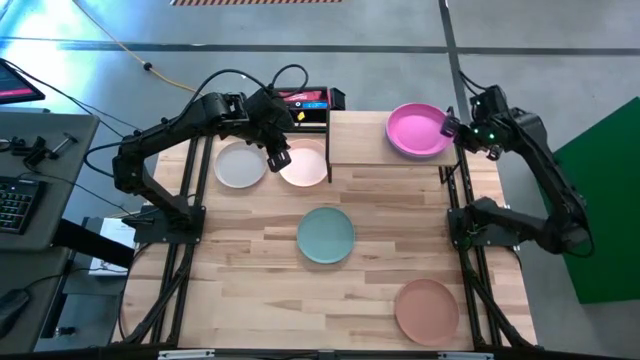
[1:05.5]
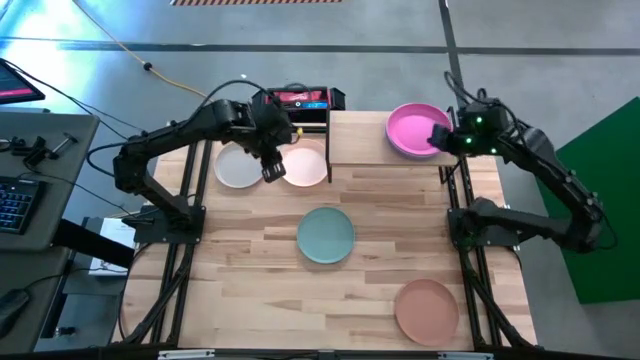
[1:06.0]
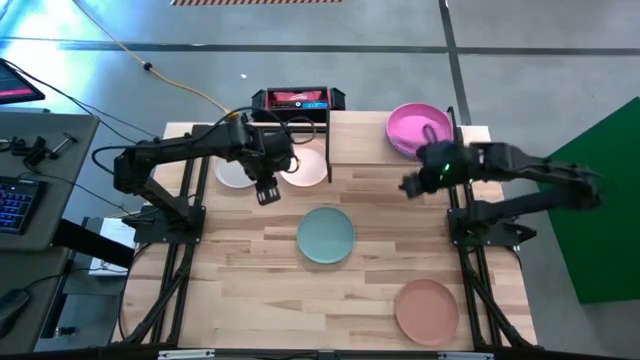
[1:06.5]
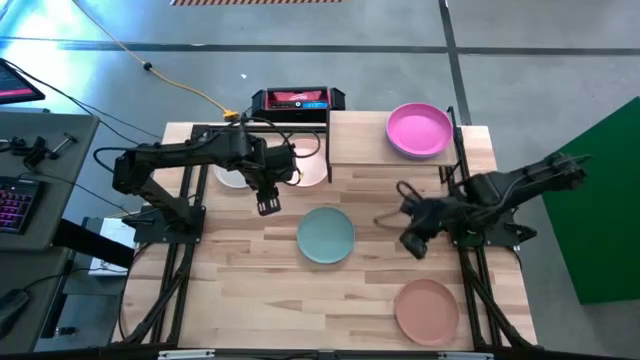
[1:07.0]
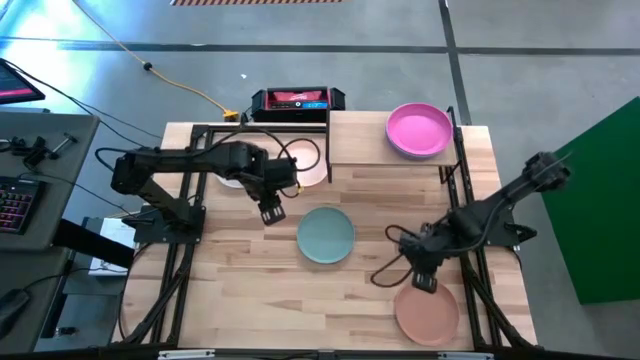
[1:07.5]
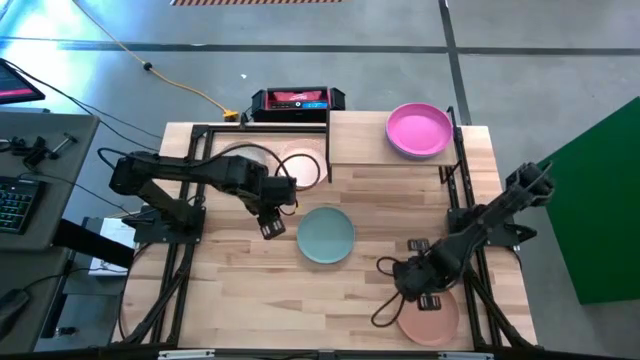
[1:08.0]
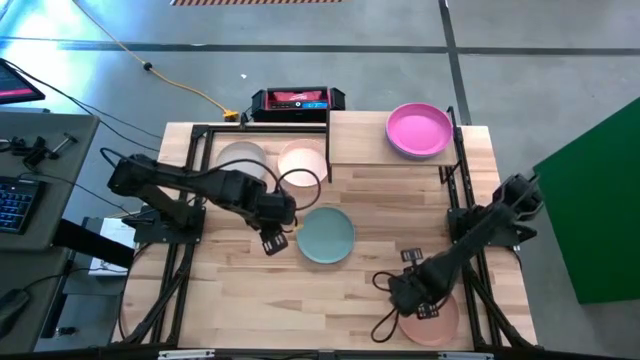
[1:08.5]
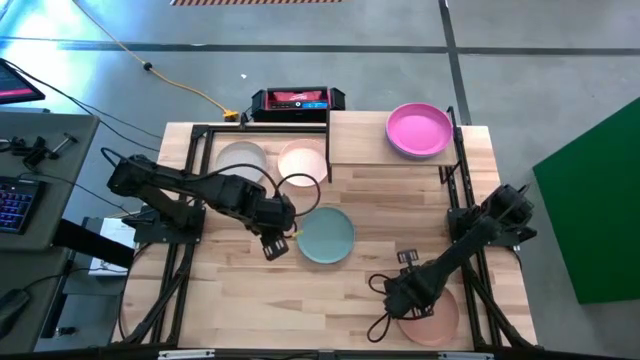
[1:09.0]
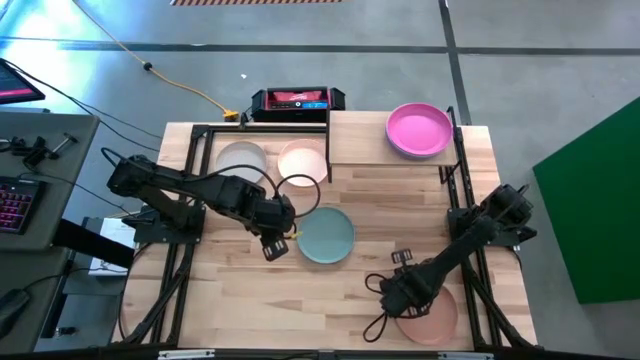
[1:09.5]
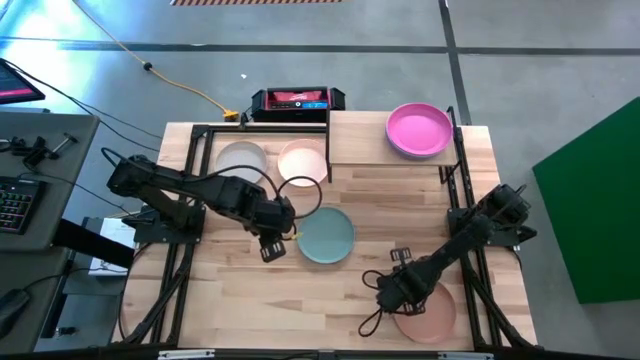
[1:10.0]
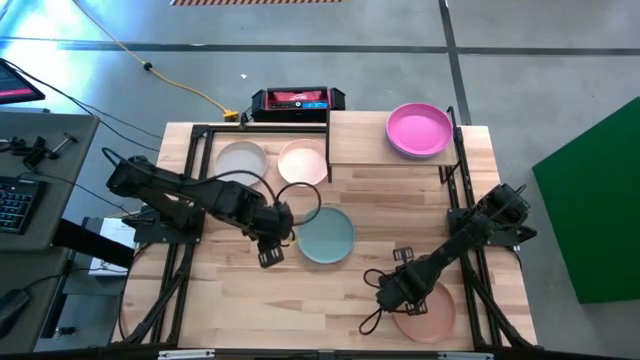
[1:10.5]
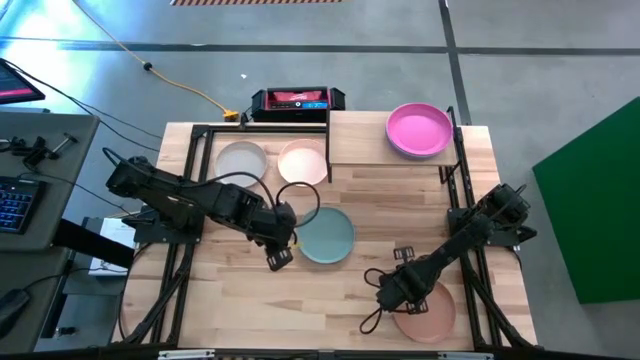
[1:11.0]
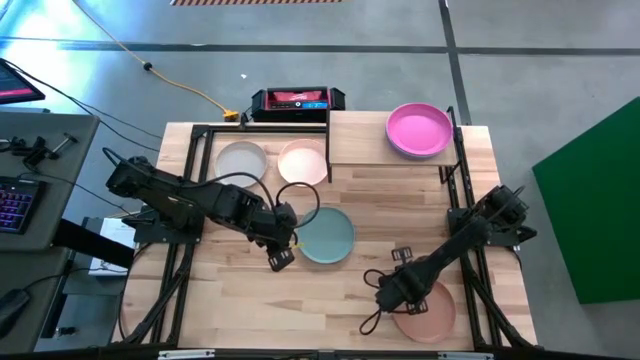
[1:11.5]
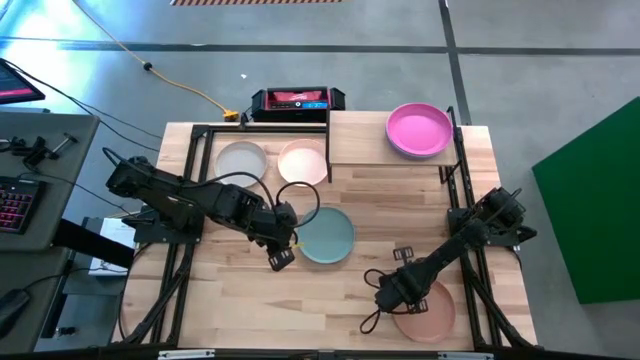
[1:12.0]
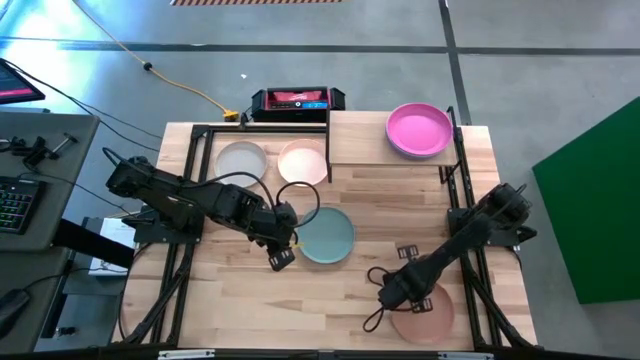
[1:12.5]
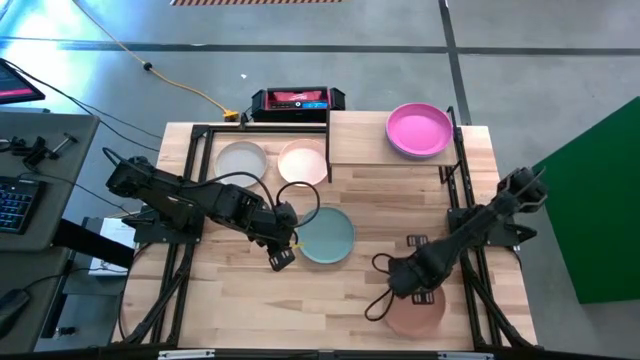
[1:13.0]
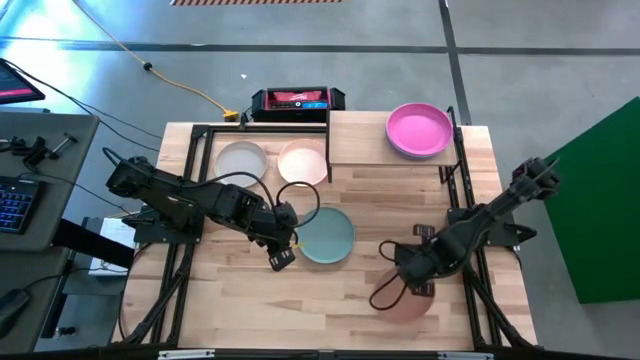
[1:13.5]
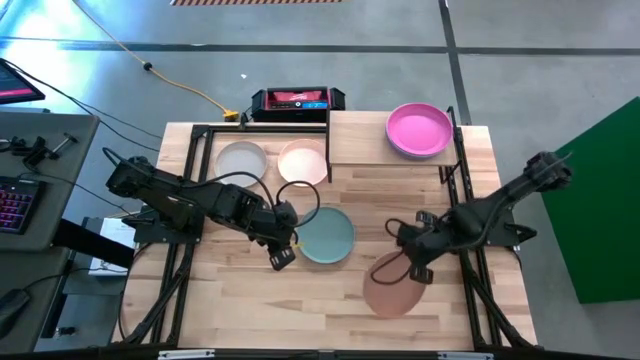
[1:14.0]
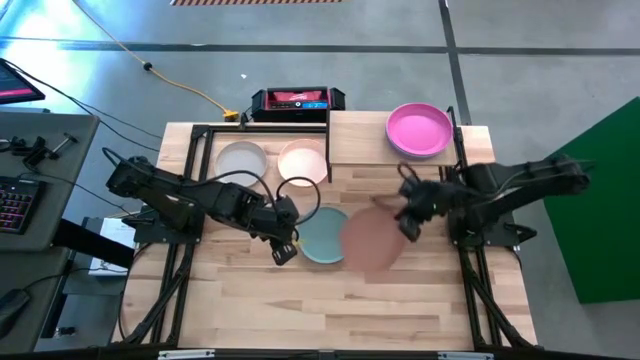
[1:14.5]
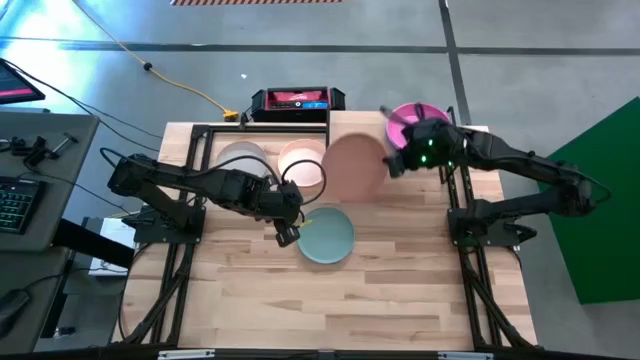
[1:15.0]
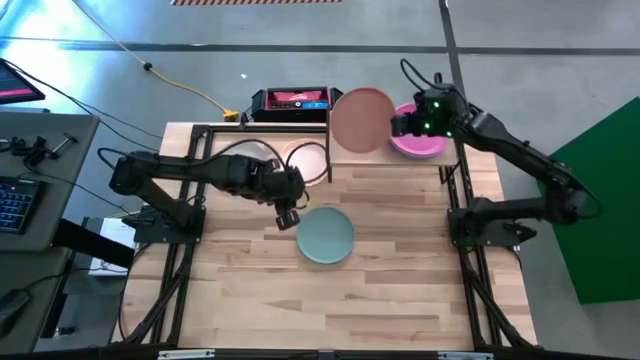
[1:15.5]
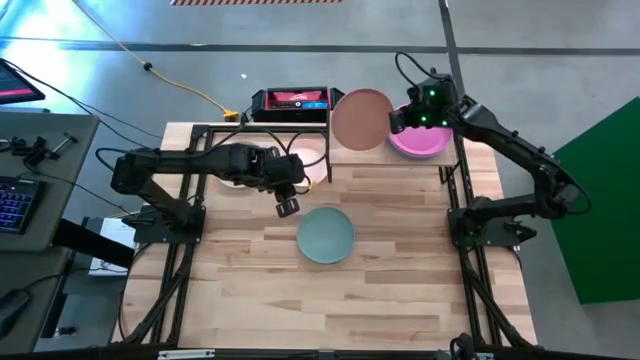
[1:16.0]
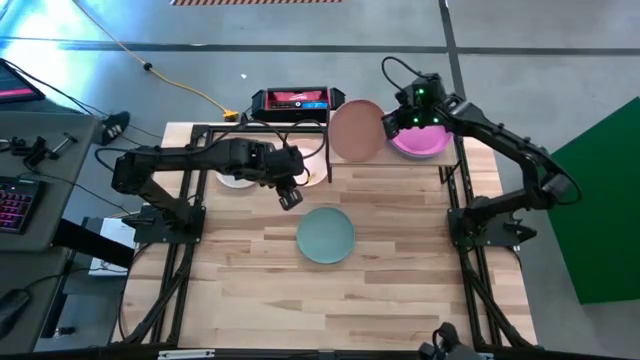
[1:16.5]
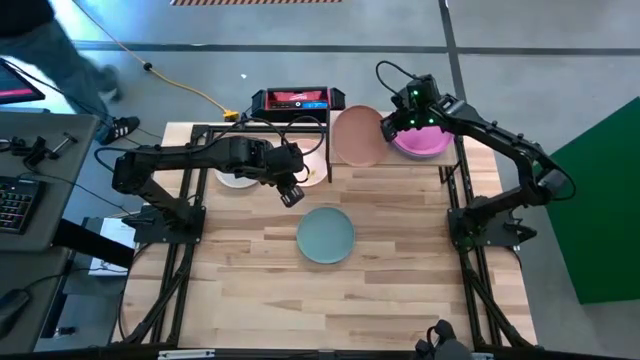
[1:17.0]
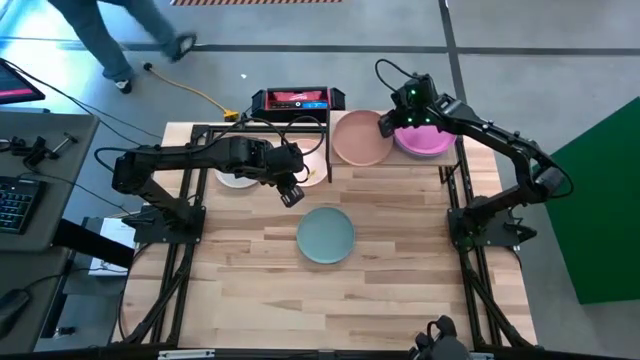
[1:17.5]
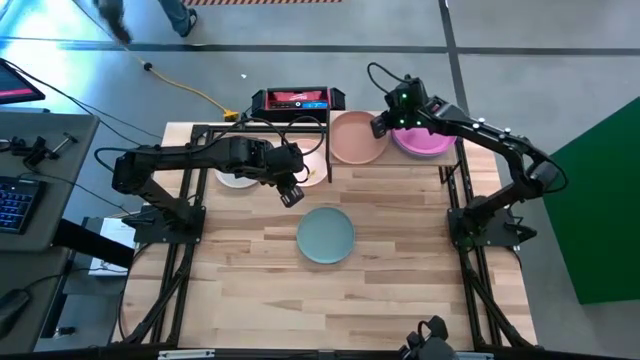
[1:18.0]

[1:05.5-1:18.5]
Task: Place and stack plates onto a shelf
Put the brown plate on the shelf

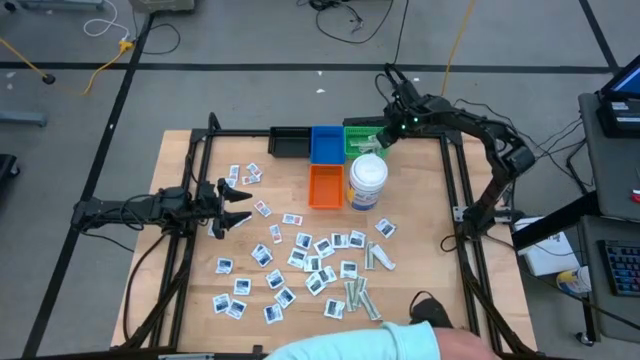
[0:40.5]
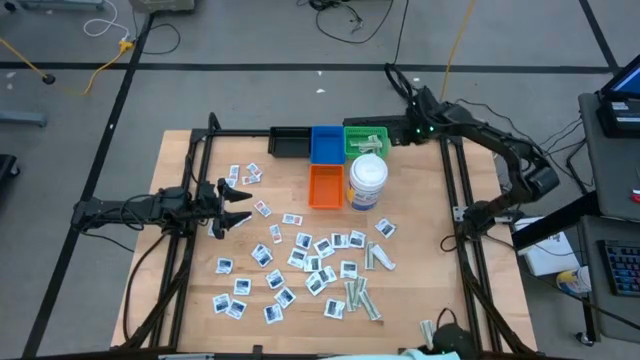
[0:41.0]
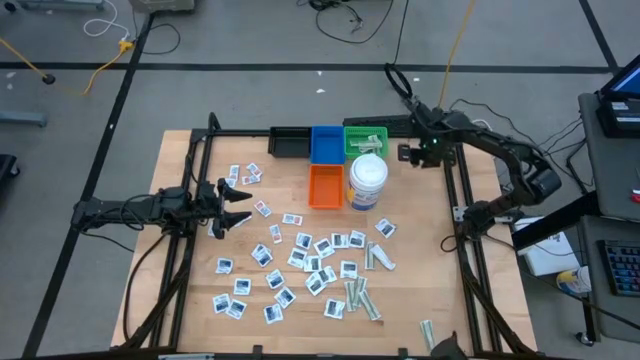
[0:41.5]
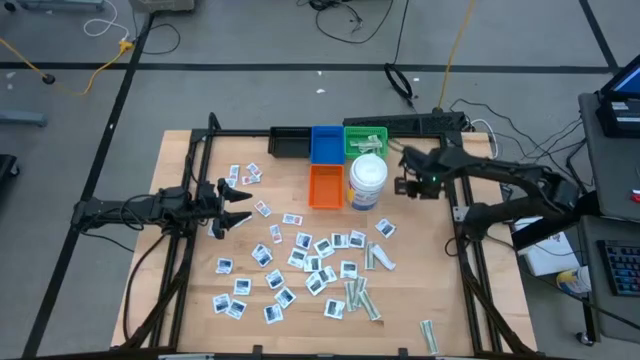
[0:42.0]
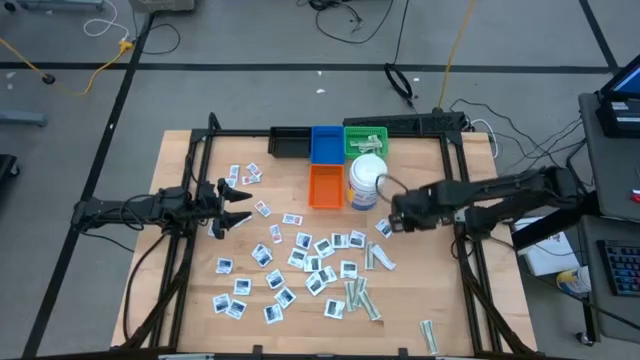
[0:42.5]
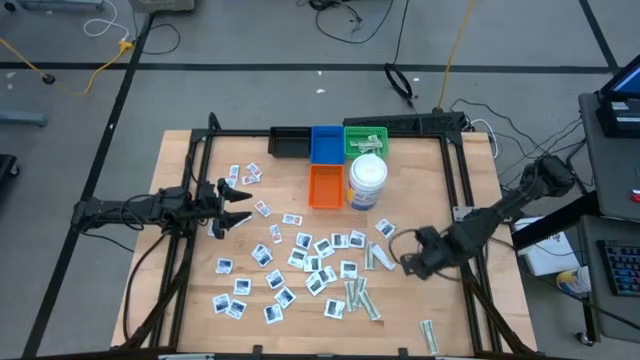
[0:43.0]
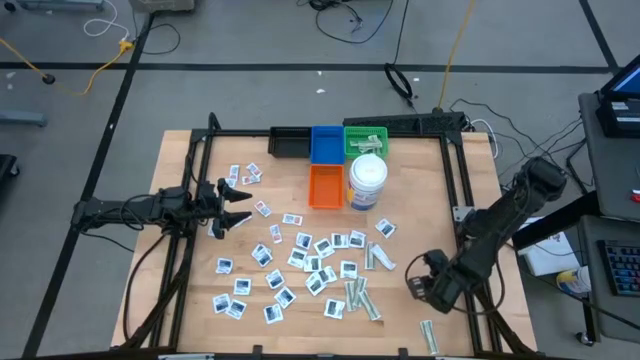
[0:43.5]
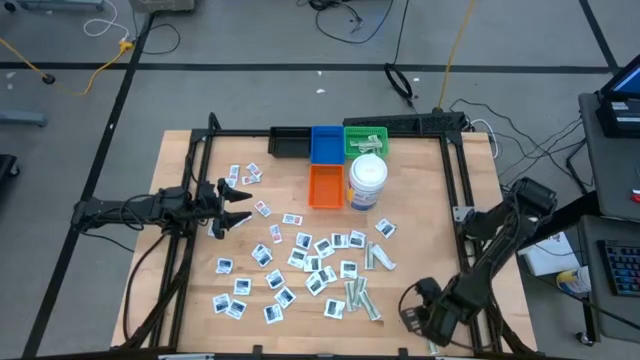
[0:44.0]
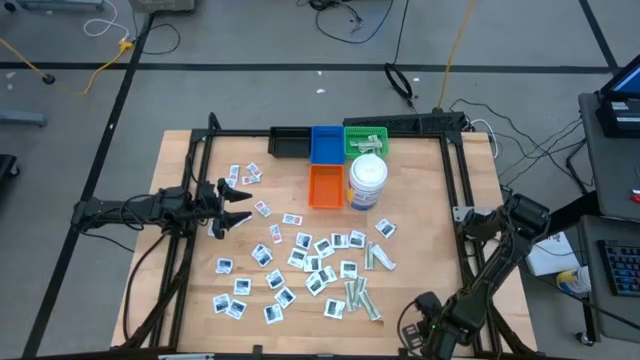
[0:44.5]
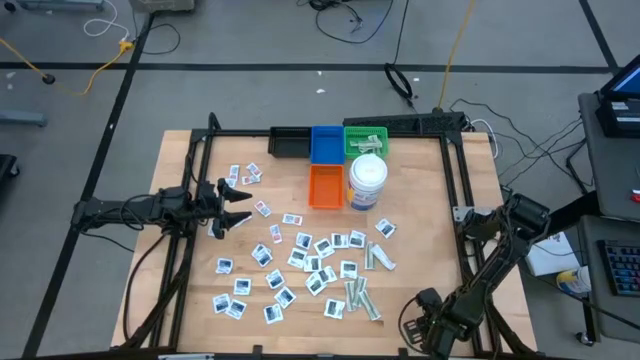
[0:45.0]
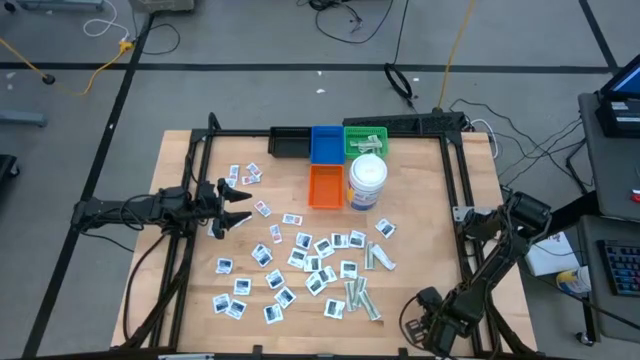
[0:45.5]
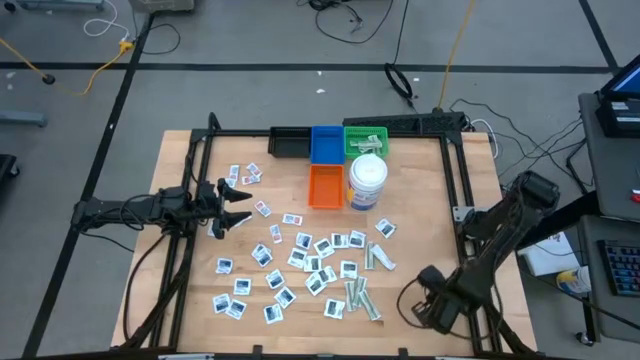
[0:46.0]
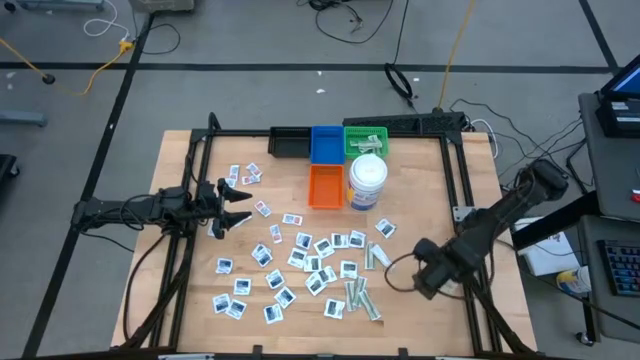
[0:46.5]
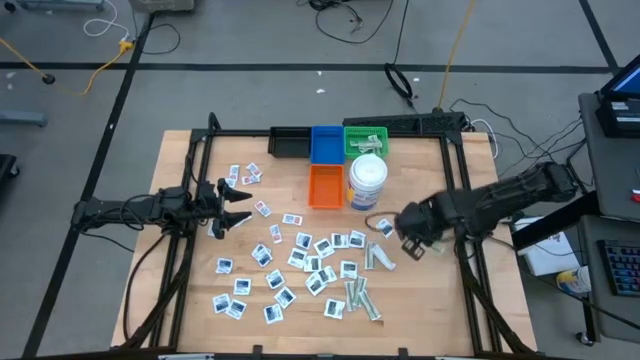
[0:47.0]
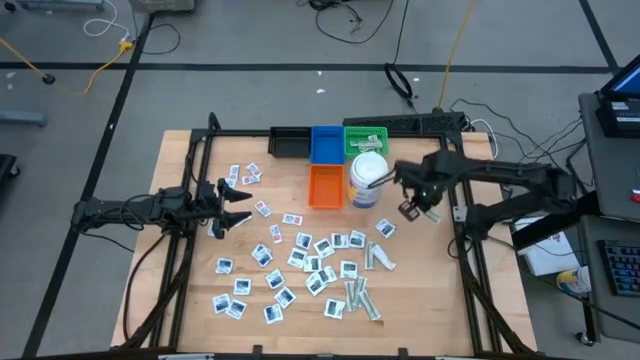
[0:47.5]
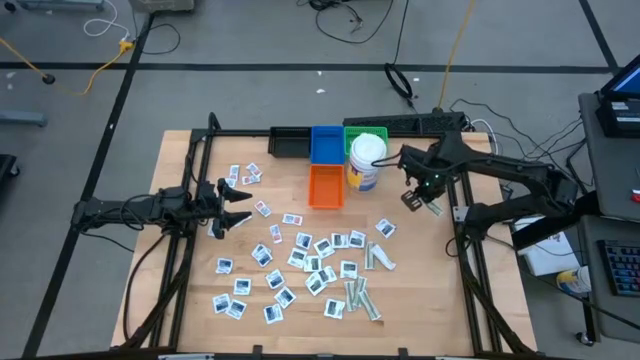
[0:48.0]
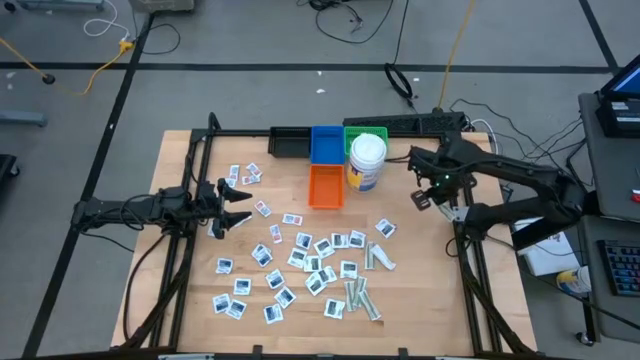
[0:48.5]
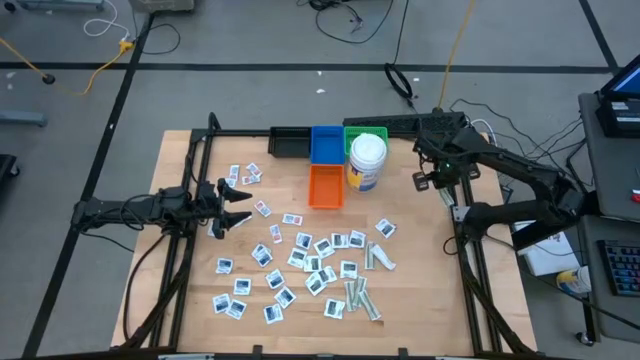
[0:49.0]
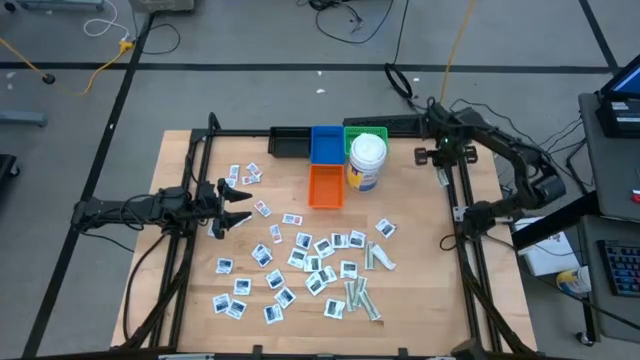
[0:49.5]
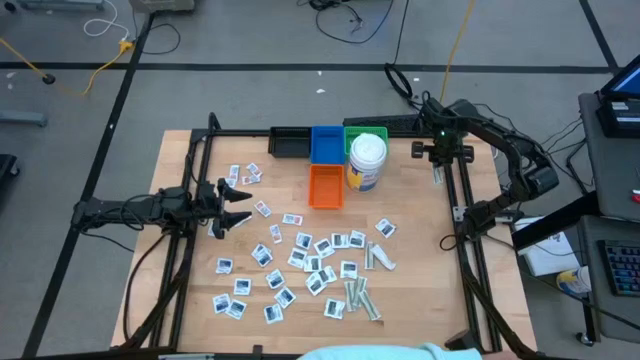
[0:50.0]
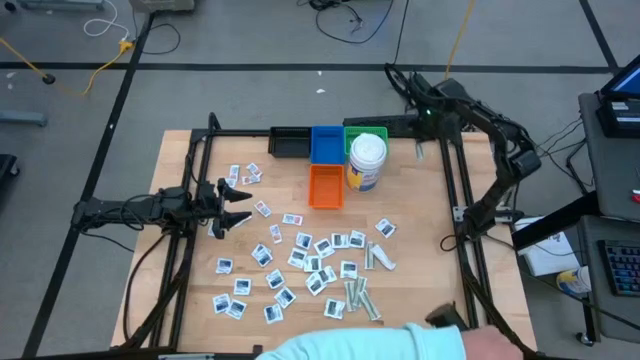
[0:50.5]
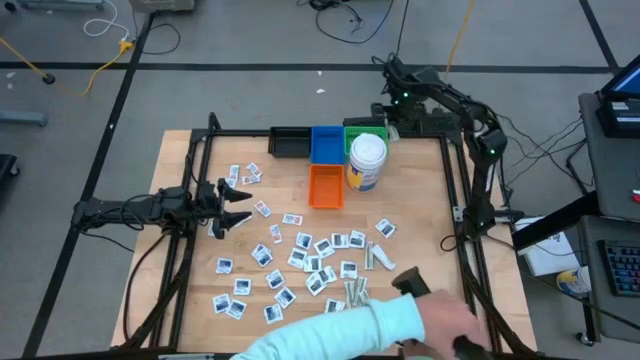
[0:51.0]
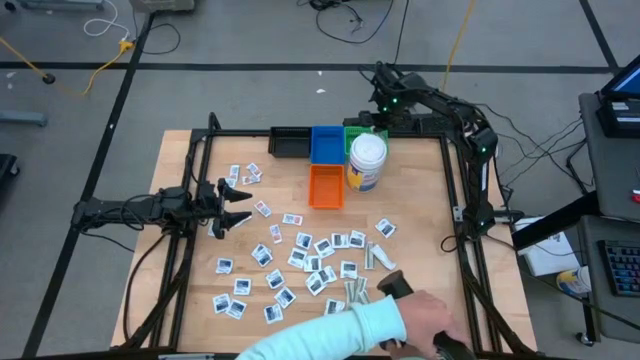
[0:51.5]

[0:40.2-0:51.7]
Task: Pick & Place First Aid Supplies
Put the green bandage pack into the green bin
